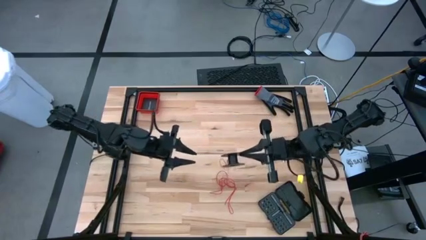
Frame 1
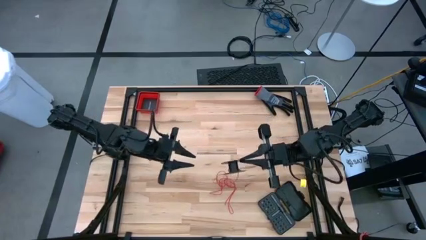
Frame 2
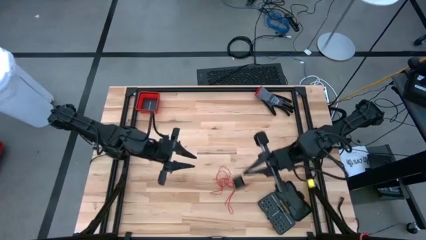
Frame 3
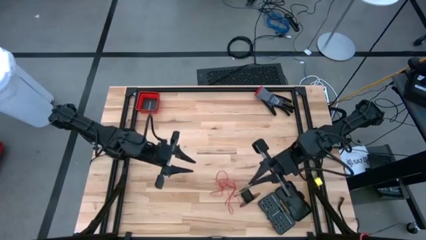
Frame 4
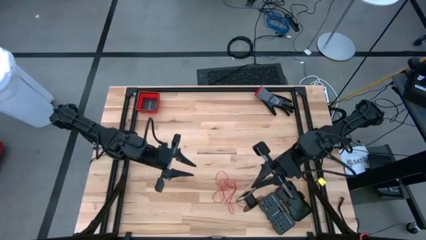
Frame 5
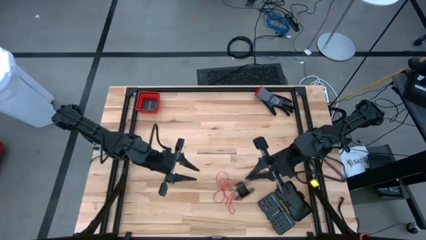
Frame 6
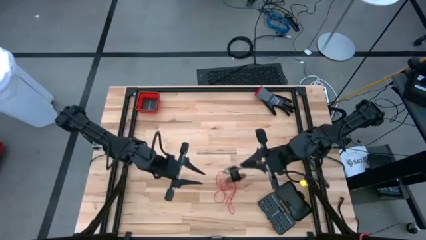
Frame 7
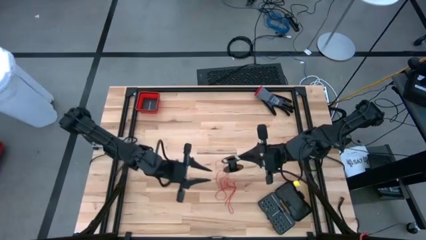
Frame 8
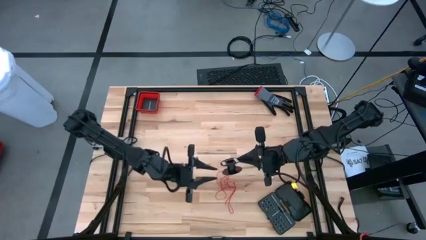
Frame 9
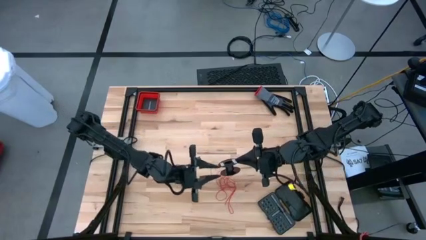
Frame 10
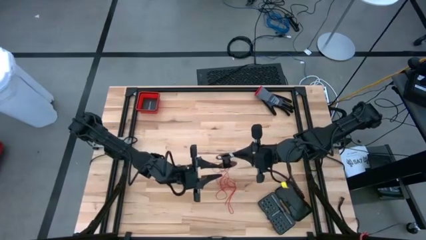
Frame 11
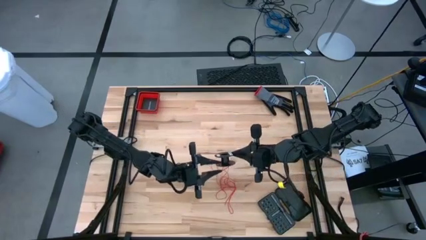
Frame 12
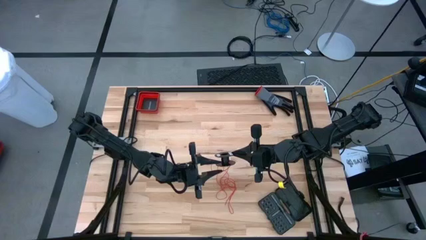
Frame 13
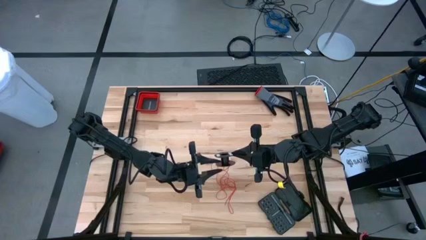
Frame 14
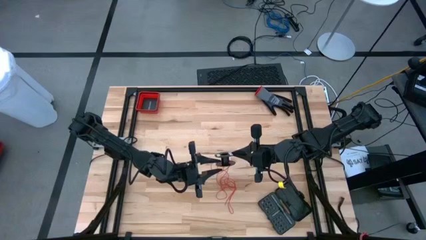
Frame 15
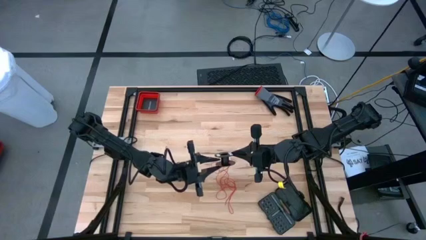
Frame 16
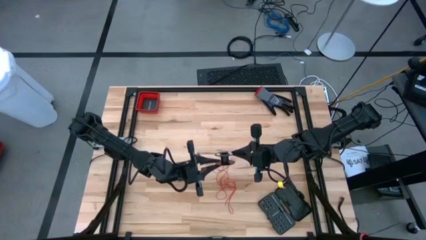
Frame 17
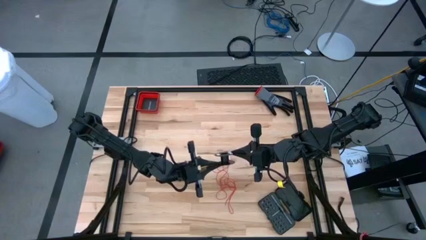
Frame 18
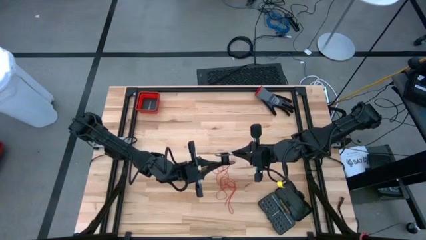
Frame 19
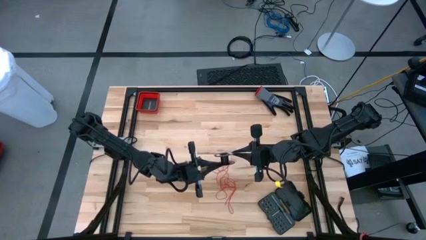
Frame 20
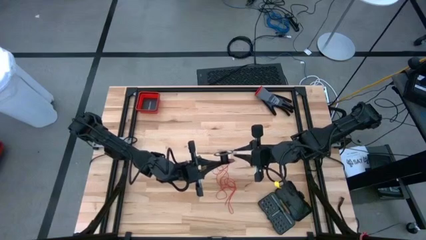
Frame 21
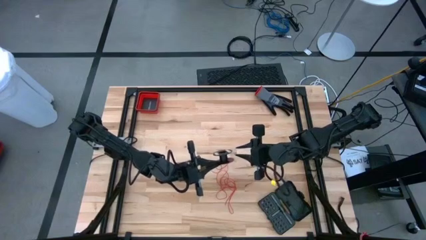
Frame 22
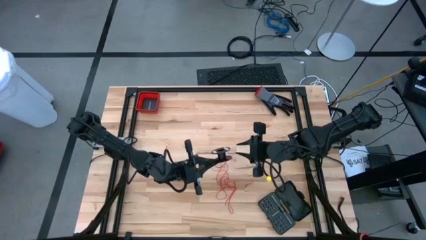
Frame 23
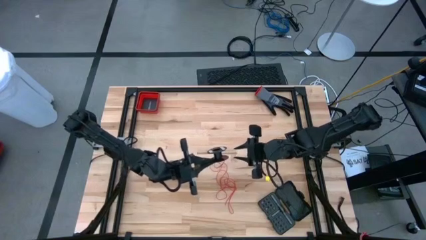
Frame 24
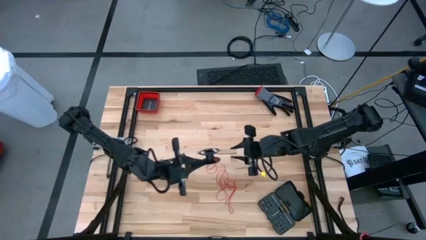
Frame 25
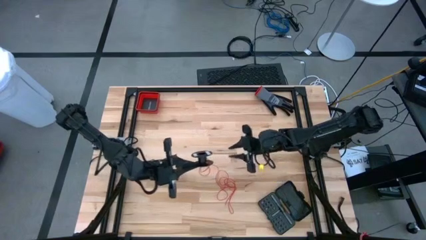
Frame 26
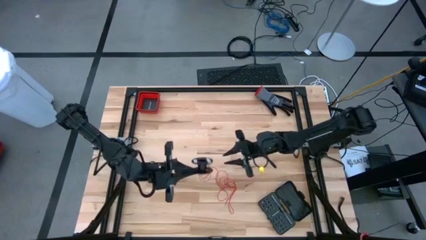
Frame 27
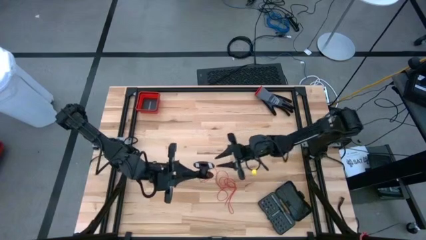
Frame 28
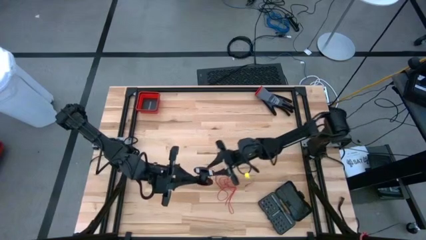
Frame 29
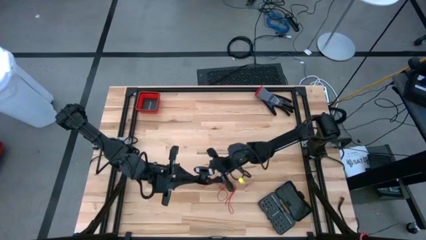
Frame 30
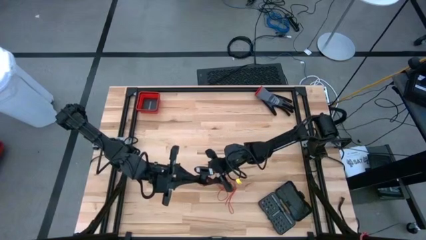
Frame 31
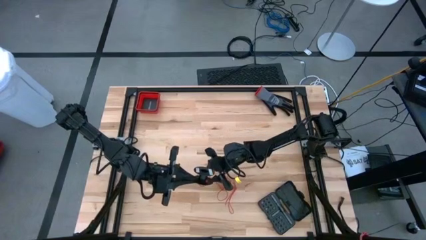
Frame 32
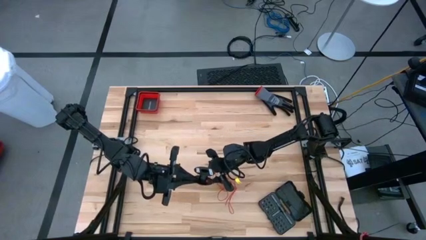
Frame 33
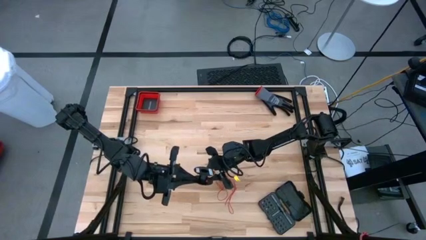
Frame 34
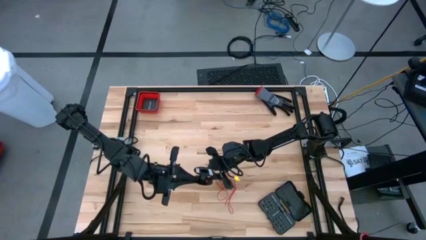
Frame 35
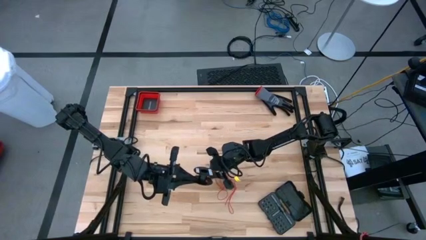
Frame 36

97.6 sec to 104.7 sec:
Task: Coil cords
Coil the red wire onto the spool

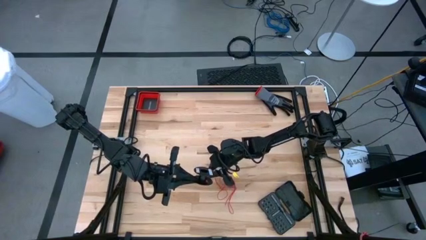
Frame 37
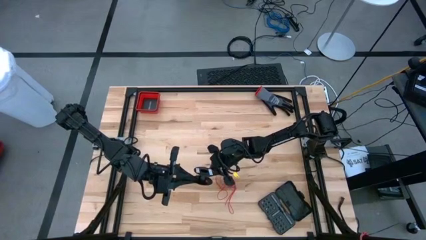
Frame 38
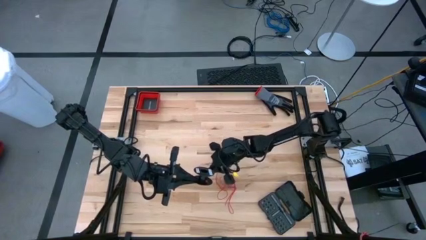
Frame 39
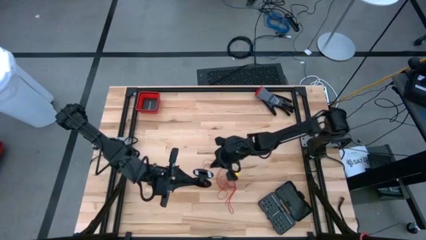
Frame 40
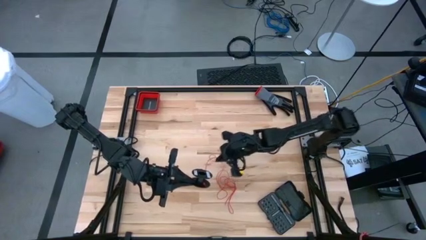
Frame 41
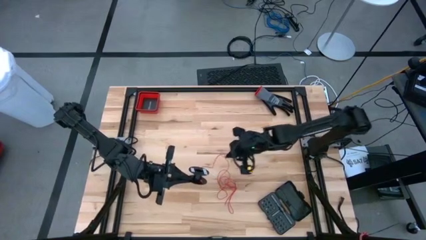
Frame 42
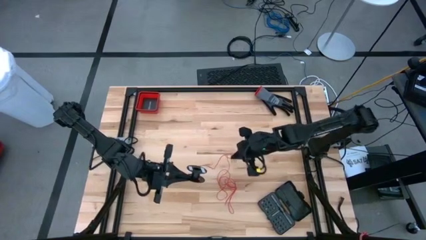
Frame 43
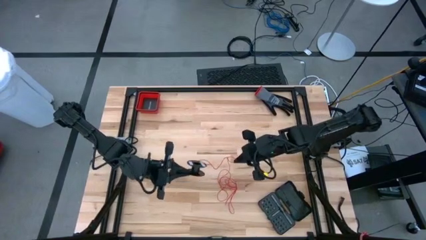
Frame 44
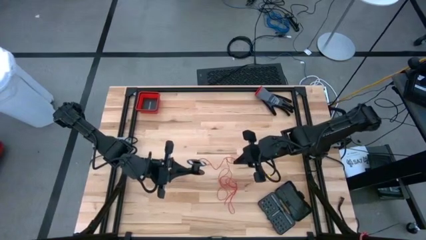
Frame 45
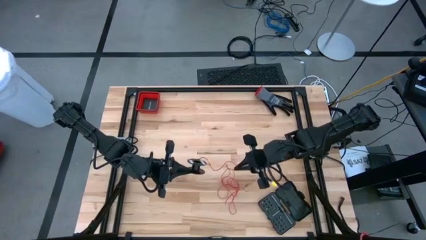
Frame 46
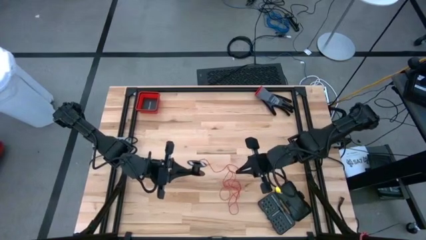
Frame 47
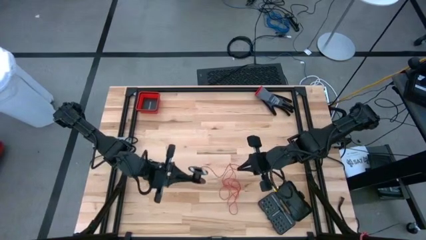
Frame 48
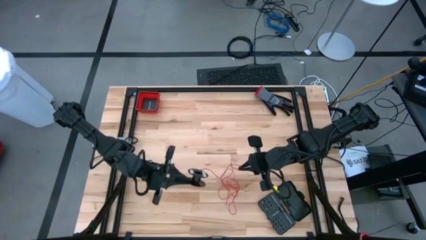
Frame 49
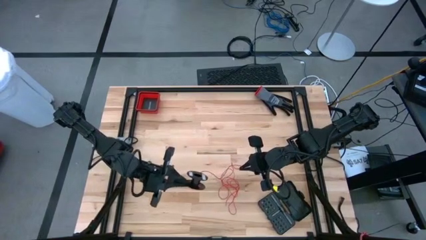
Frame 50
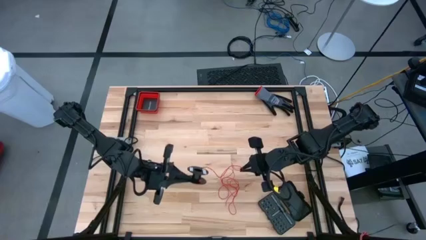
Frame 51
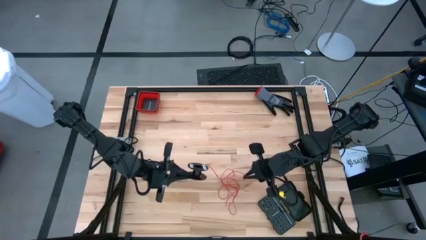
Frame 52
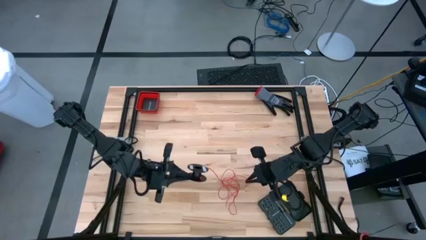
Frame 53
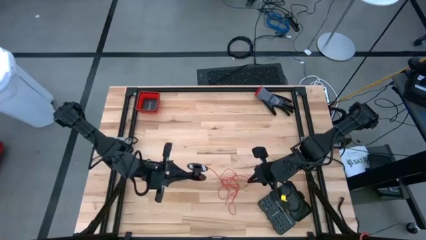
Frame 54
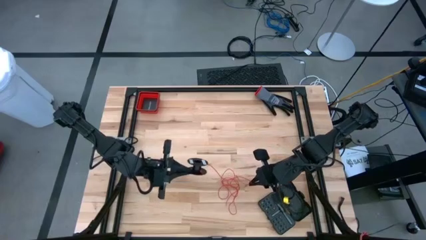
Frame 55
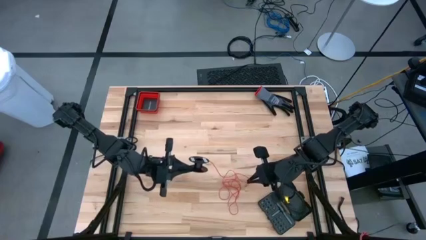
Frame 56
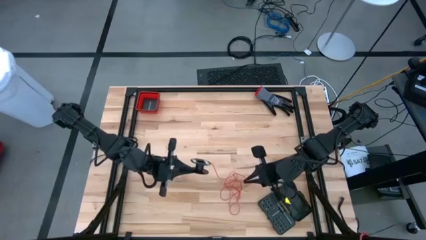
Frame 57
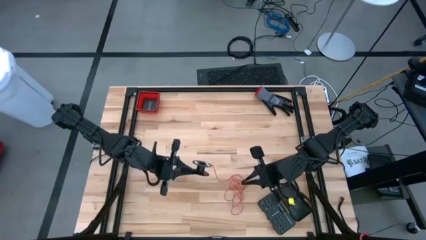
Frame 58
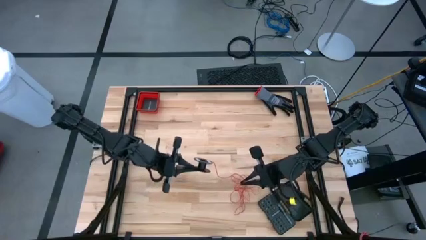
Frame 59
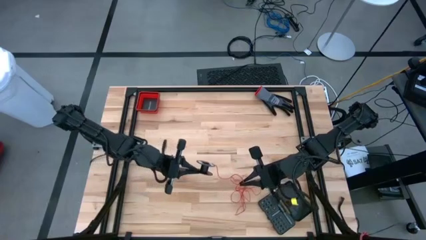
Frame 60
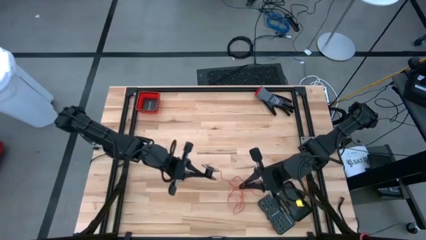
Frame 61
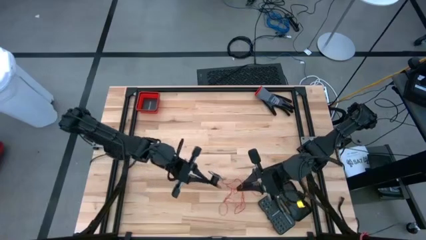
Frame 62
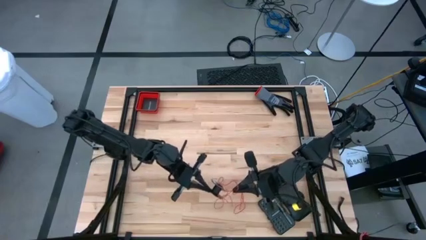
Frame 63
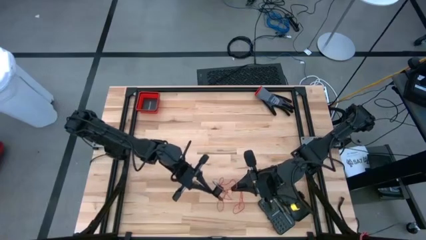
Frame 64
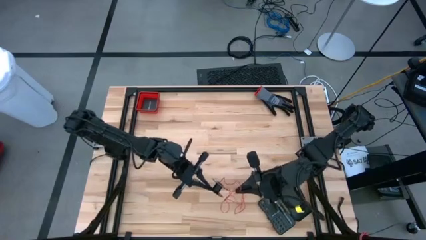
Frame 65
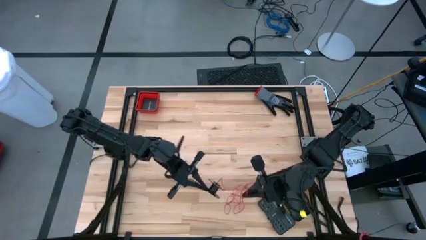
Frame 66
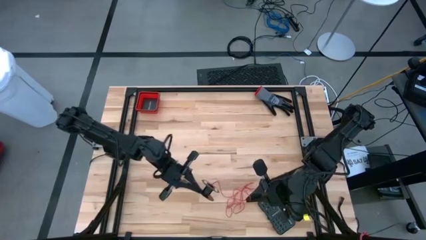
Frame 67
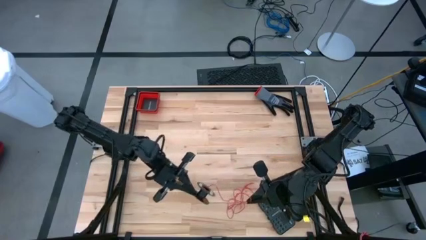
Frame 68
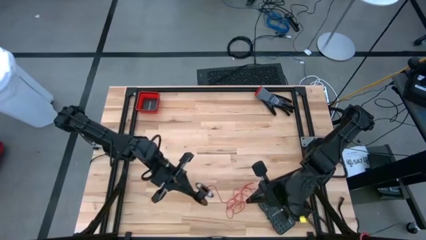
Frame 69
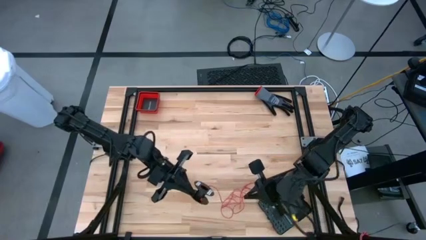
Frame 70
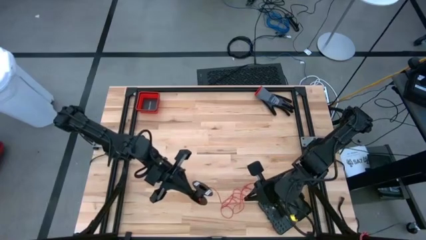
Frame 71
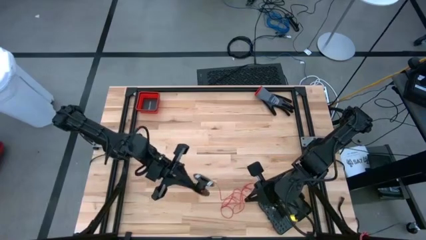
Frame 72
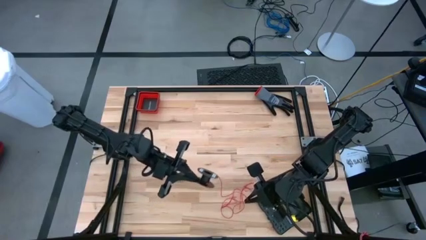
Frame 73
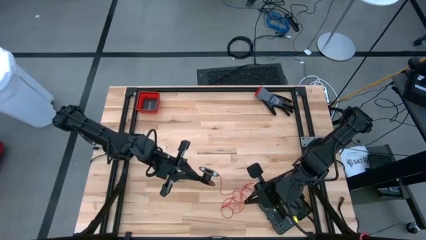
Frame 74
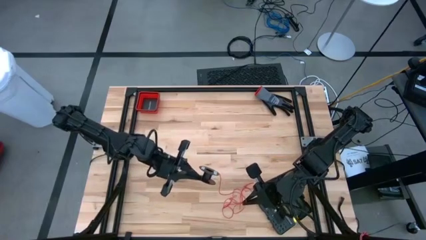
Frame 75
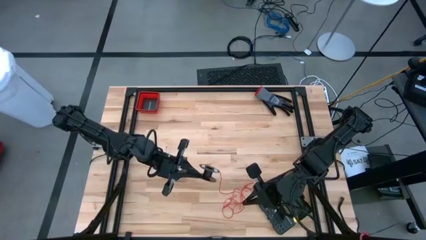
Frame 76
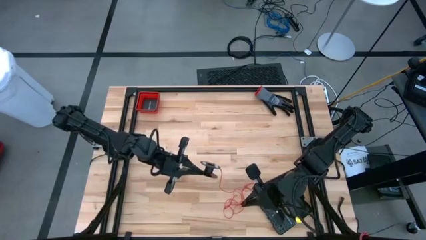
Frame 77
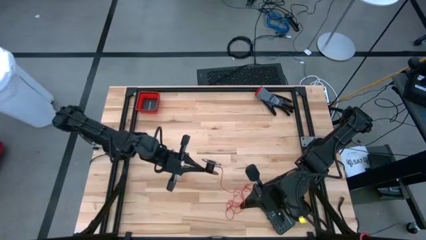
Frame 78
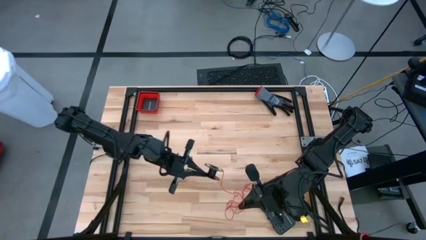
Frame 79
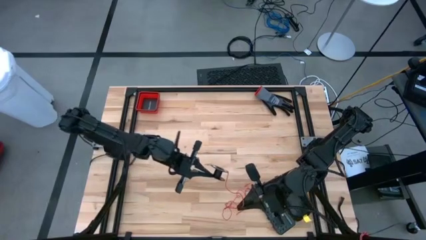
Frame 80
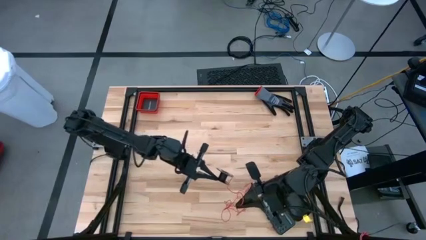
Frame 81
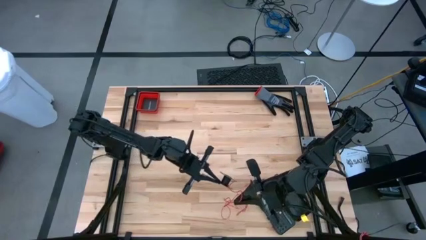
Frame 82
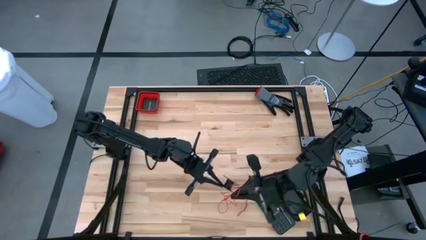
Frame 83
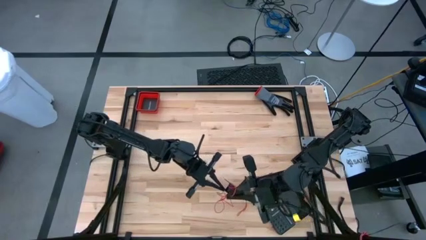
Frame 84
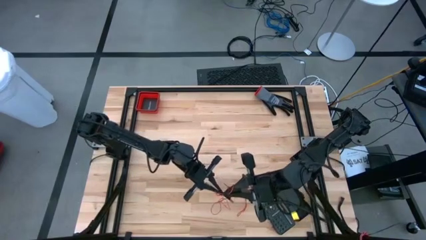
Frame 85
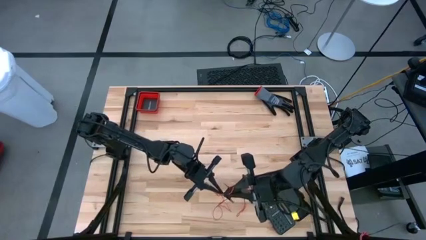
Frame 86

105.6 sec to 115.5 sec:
Coil the red wire onto the spool

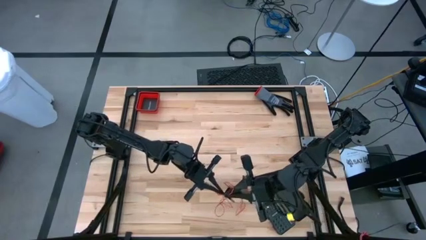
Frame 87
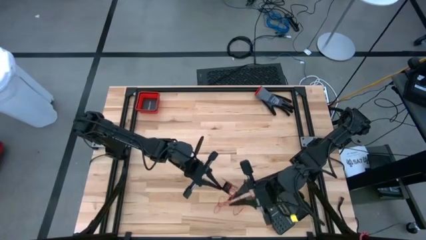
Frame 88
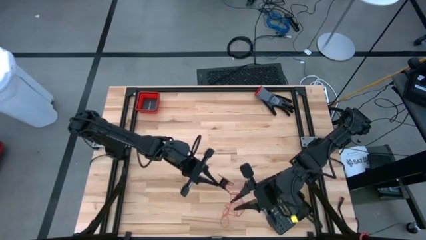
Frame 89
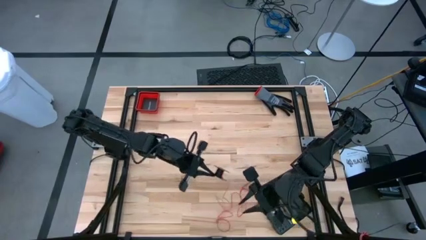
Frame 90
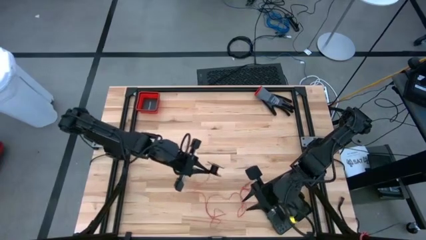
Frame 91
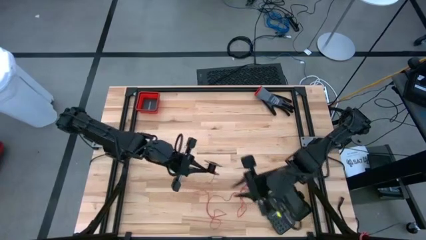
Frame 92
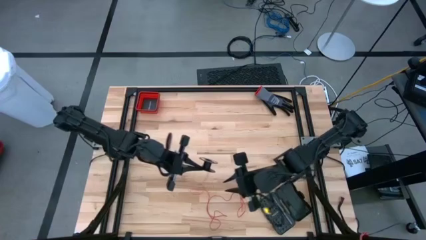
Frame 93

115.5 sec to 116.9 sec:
Coil the red wire onto the spool
